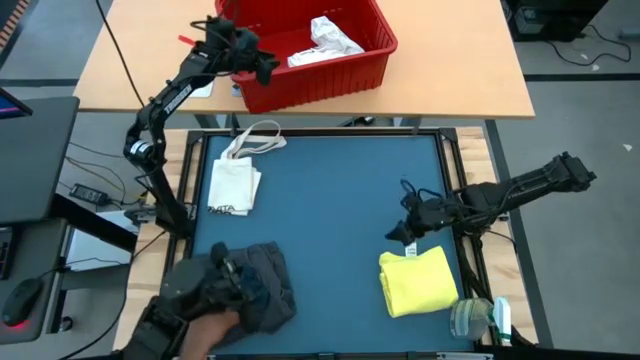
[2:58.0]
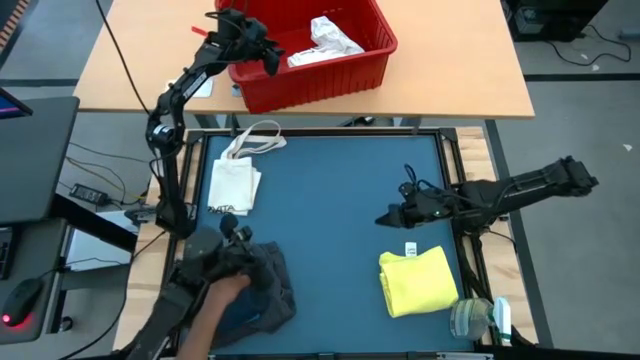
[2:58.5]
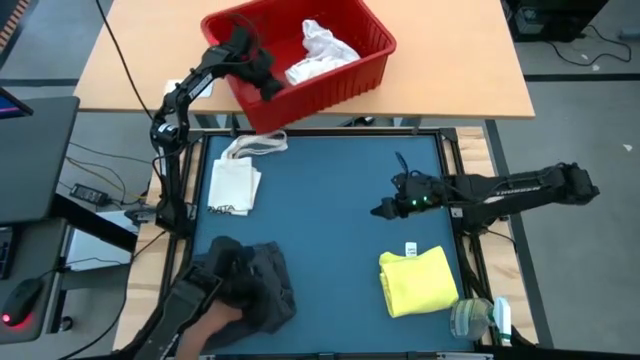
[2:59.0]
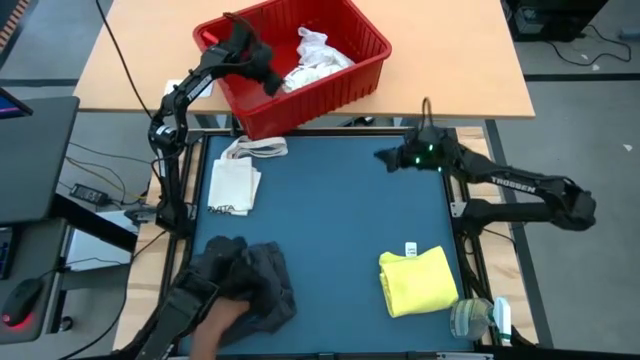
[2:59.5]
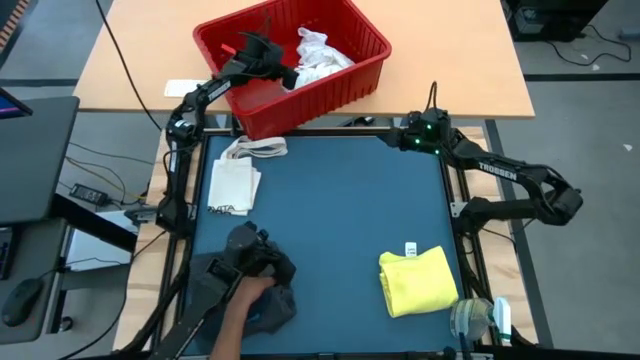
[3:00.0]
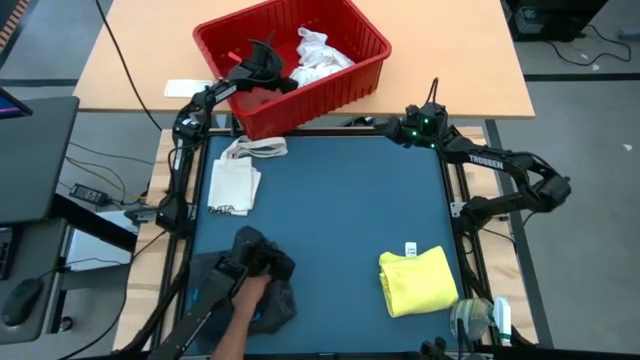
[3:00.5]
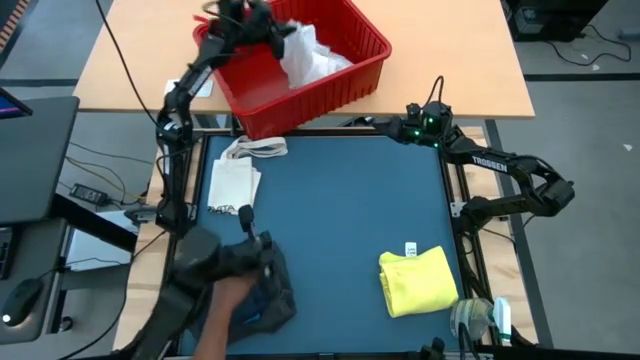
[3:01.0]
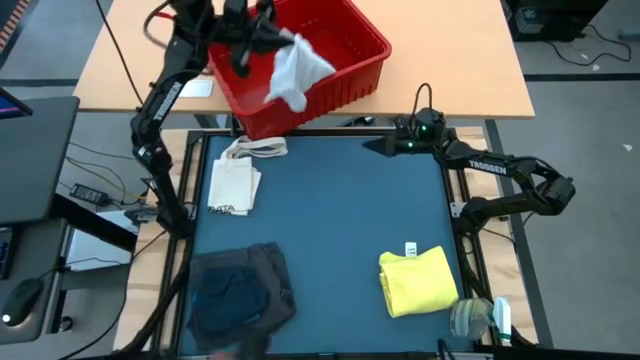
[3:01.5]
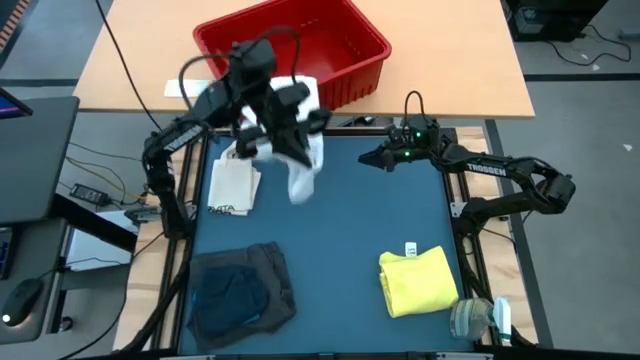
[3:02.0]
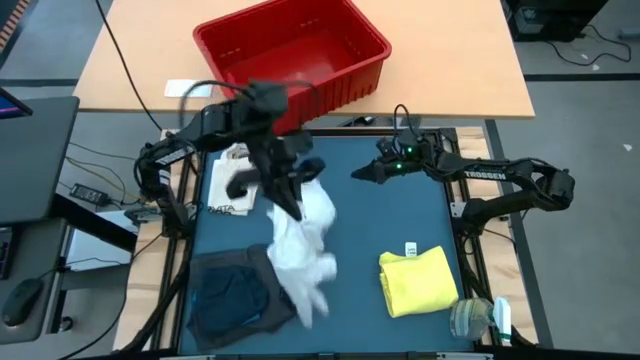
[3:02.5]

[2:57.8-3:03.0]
Task: Fold laundry
Remove the white shirt from the red bin

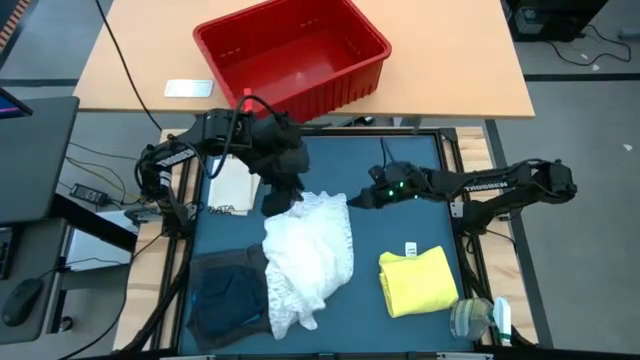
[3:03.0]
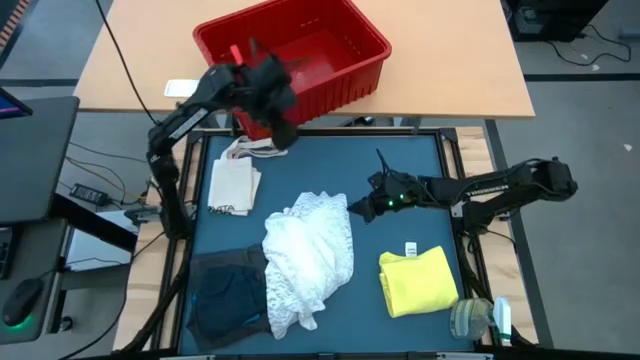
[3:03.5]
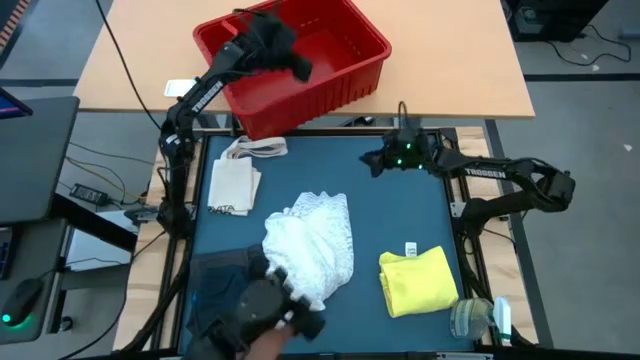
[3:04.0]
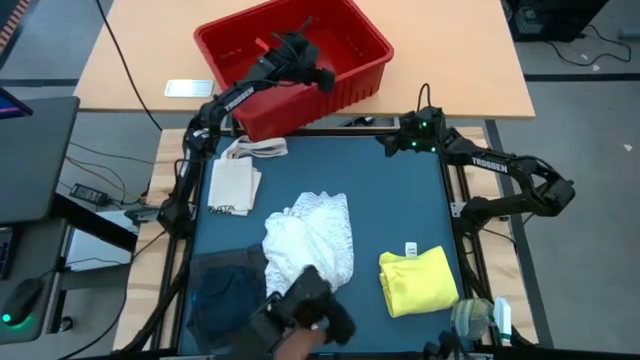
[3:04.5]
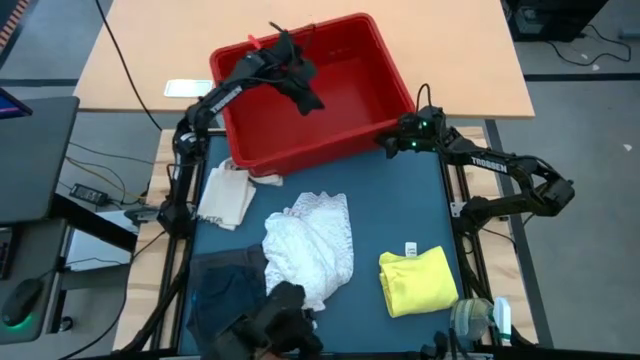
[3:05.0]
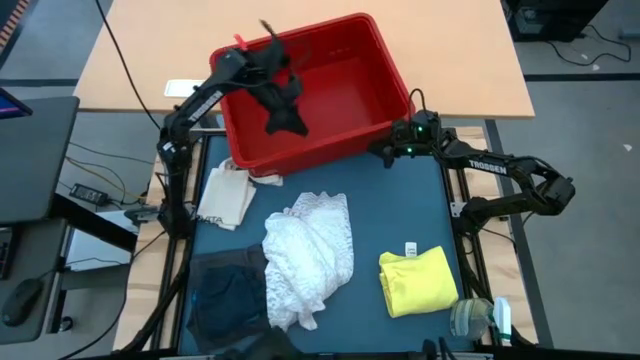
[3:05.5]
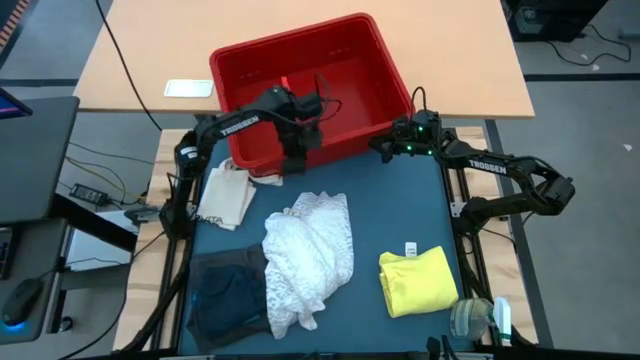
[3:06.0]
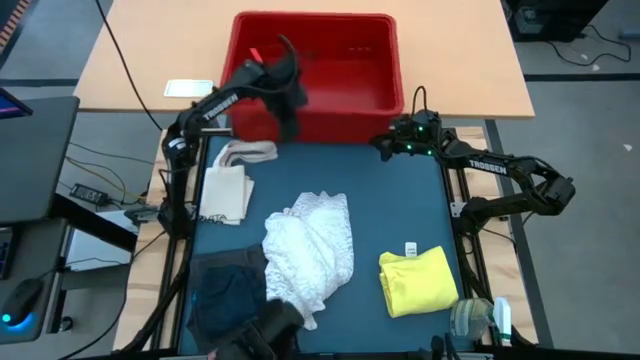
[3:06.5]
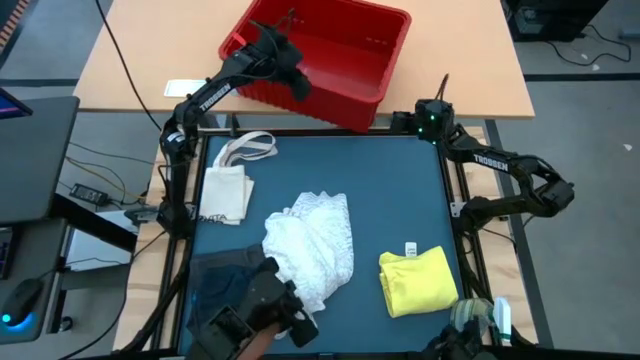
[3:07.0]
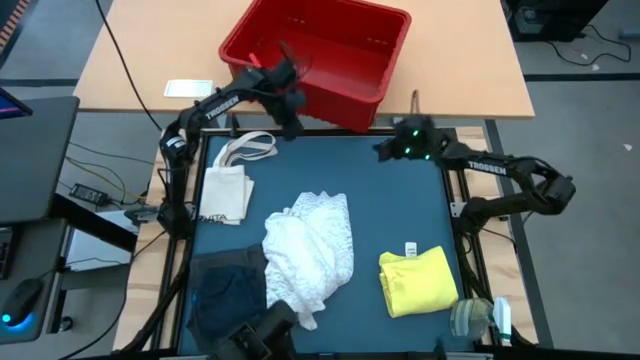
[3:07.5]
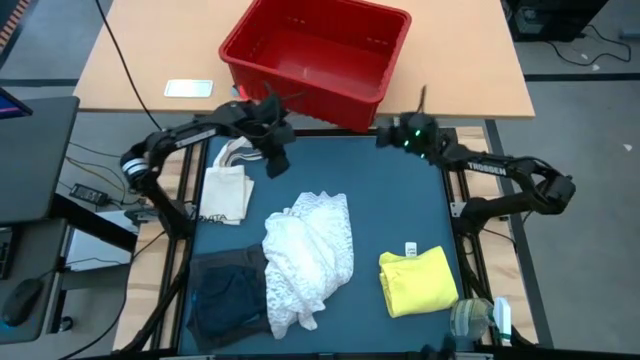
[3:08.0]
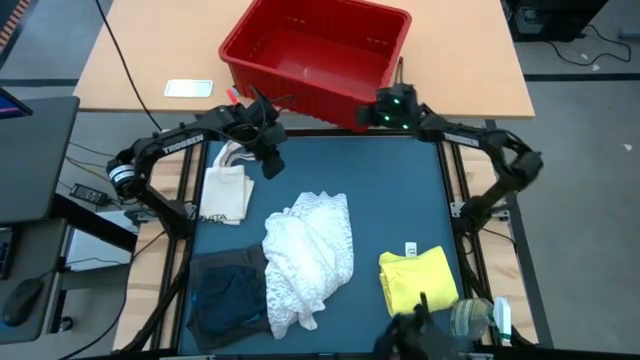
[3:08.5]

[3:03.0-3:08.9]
Adjust the red bin

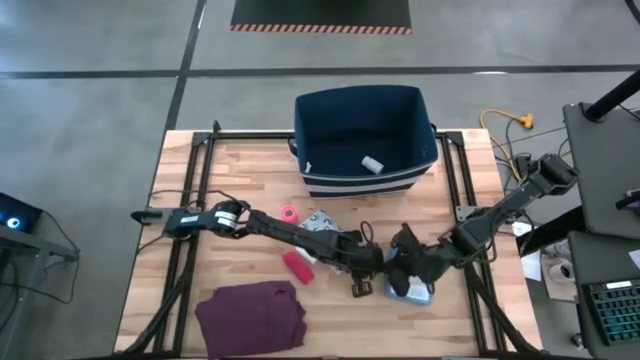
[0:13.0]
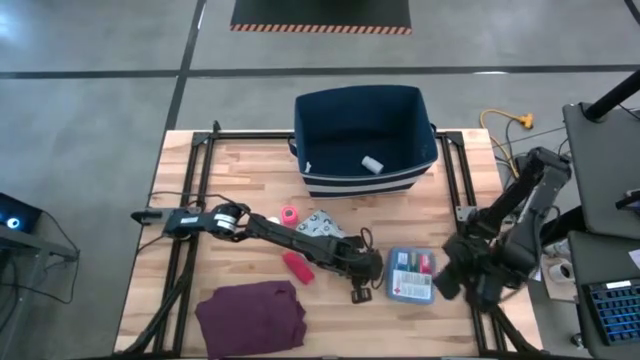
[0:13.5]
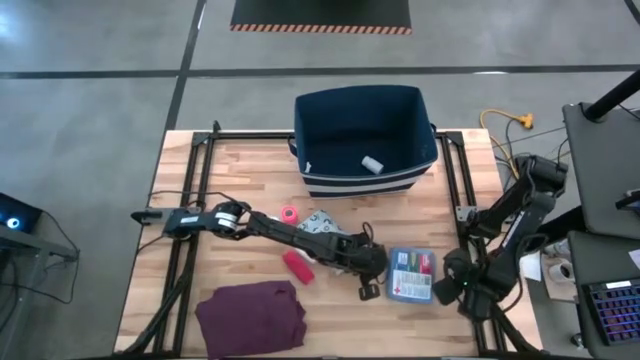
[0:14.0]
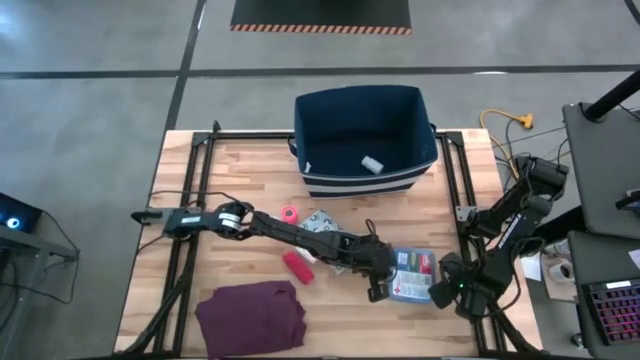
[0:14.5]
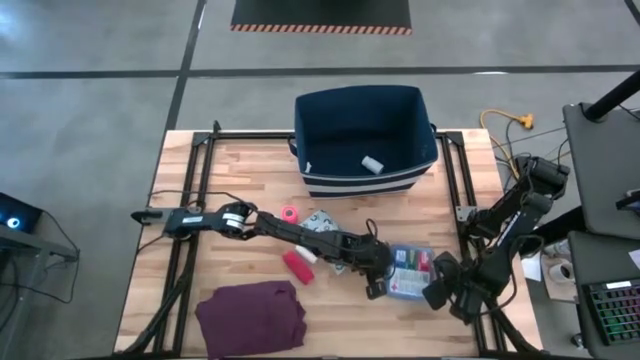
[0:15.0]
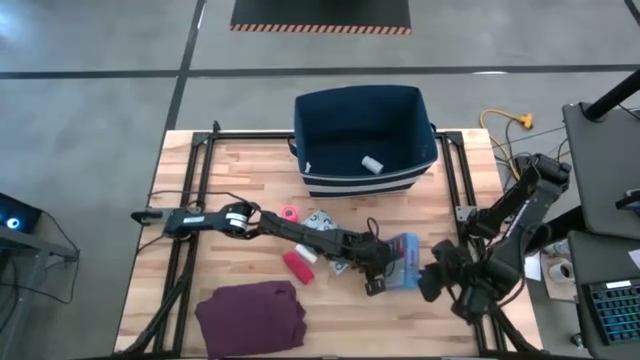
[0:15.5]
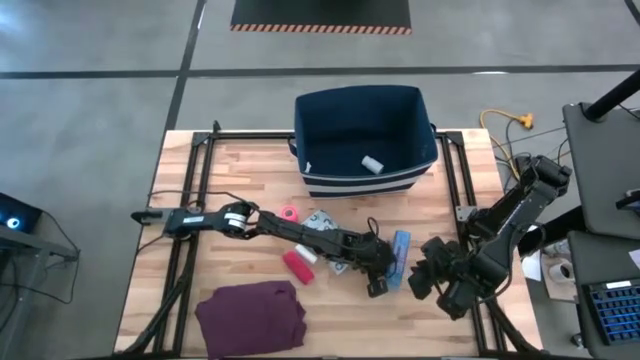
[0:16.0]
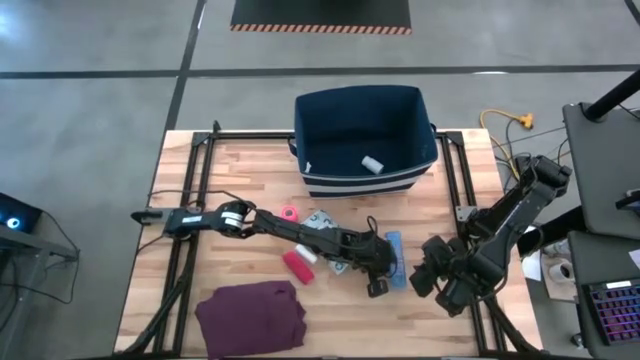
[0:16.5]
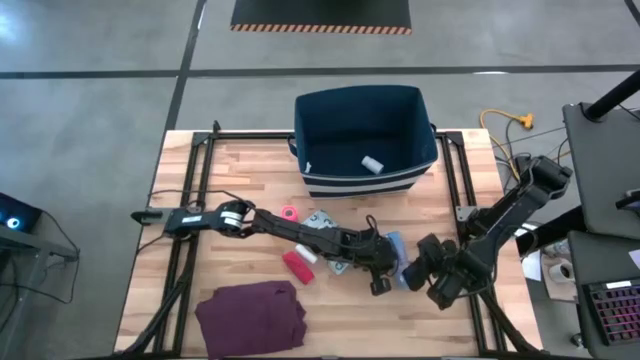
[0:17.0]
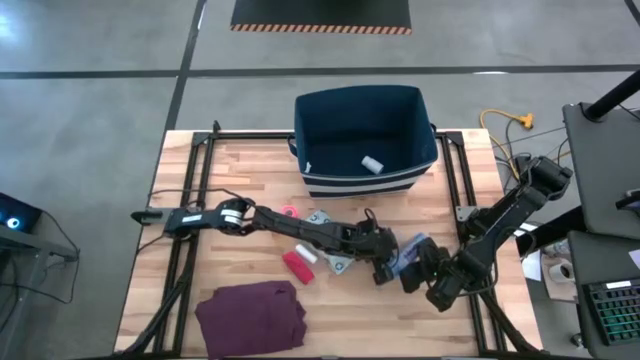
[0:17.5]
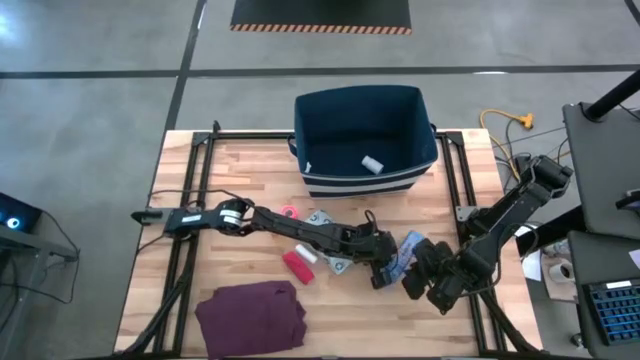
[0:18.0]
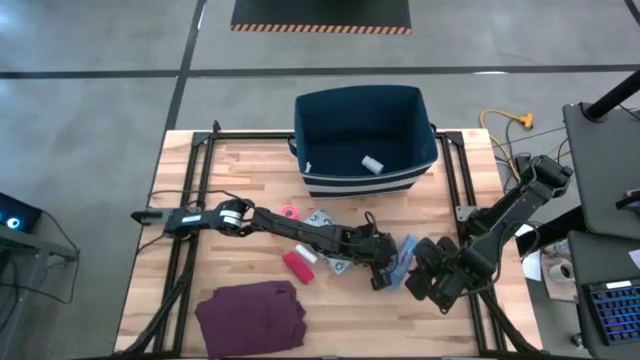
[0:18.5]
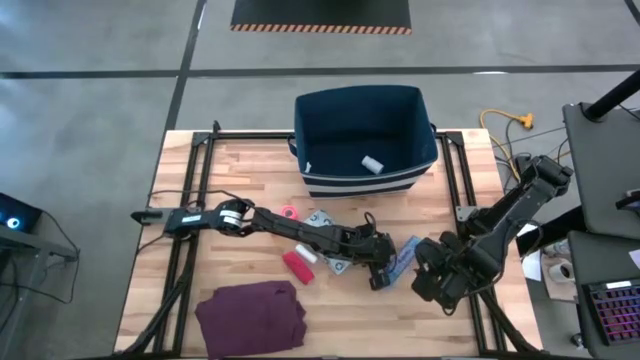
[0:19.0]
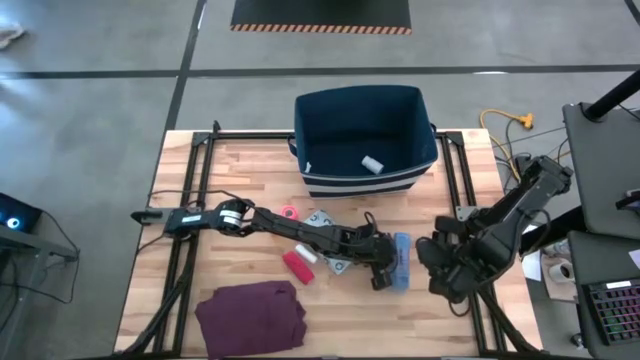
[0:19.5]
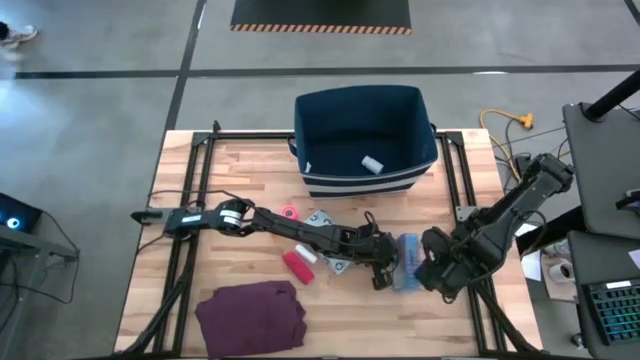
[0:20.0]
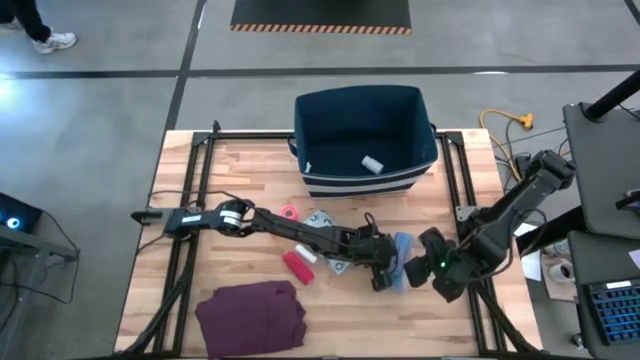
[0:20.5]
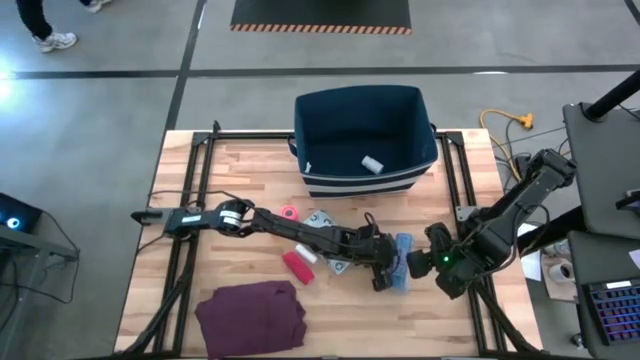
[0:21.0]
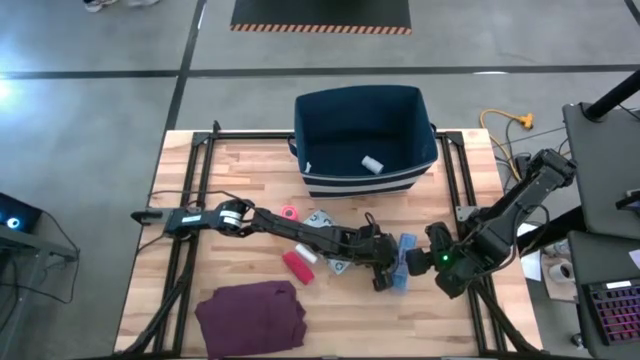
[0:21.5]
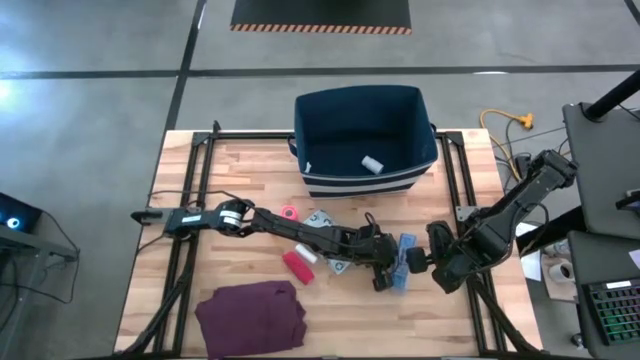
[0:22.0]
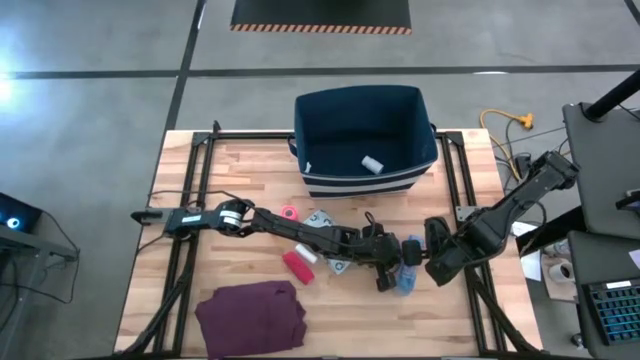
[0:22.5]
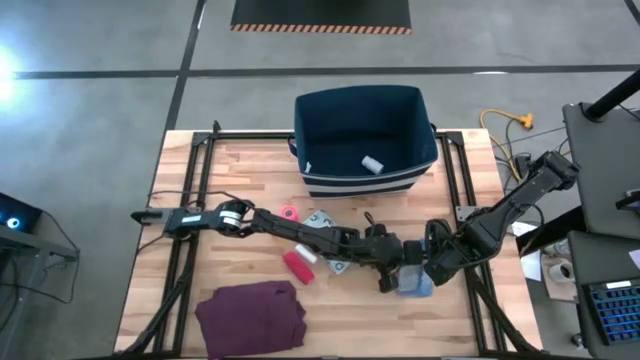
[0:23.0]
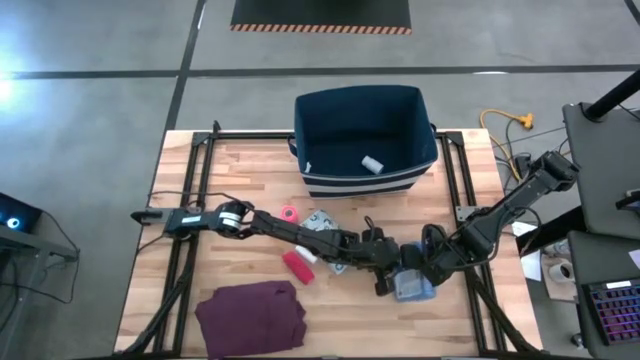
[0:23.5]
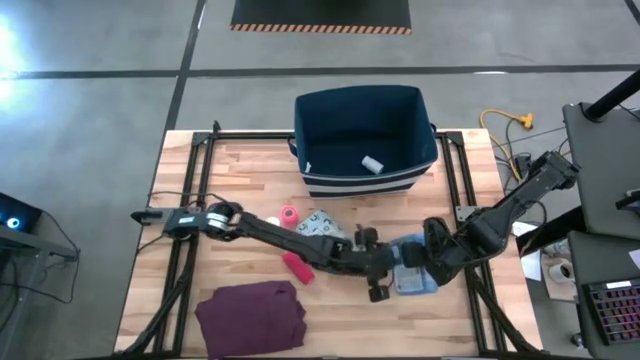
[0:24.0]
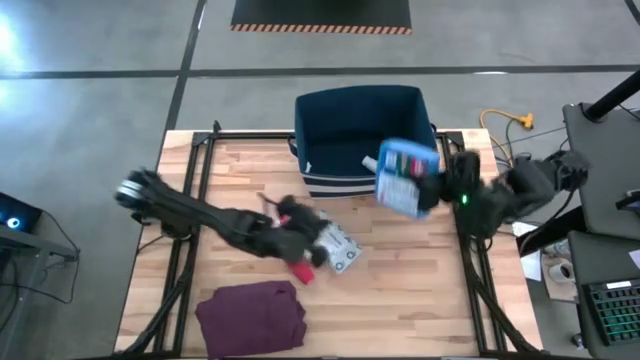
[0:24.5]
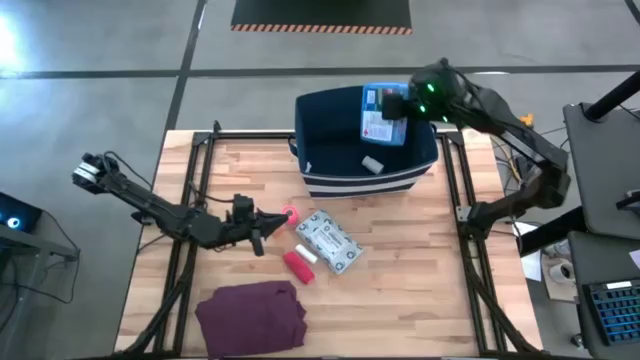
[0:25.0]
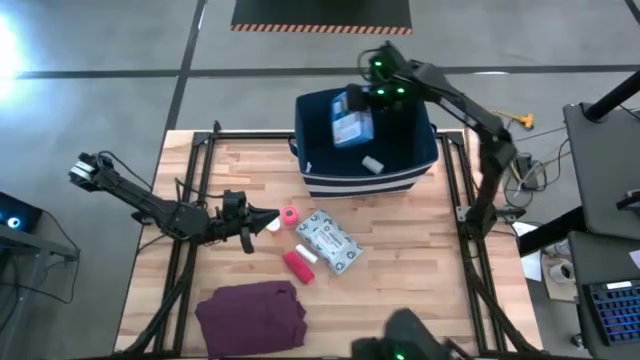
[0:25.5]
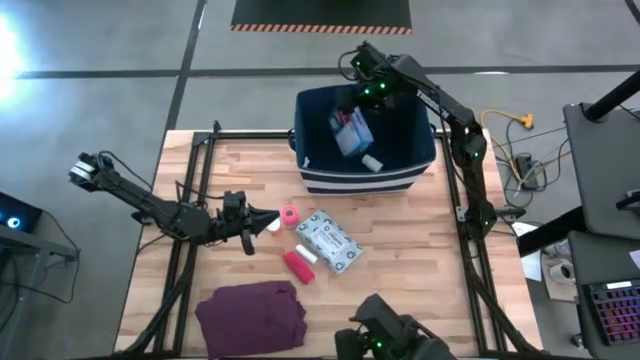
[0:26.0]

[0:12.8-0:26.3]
Task: Pick & place medical supplies in basket/bin
Put the blue first aid kit into the blue bin
